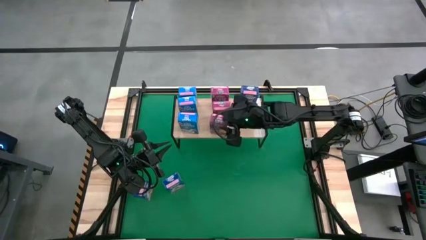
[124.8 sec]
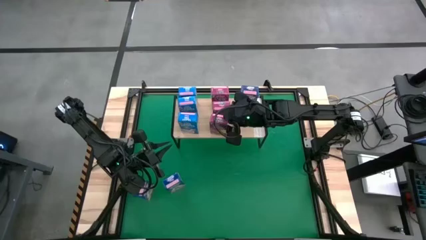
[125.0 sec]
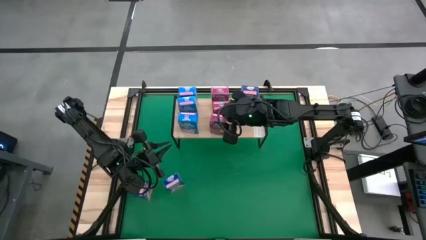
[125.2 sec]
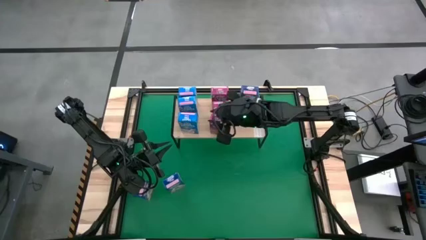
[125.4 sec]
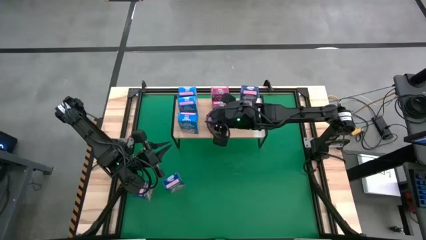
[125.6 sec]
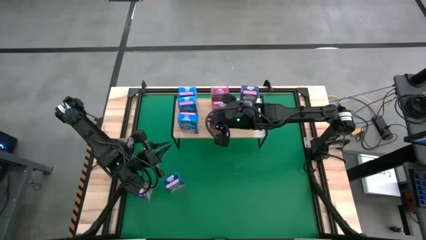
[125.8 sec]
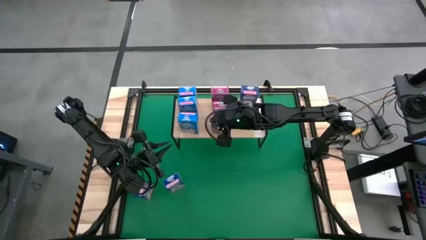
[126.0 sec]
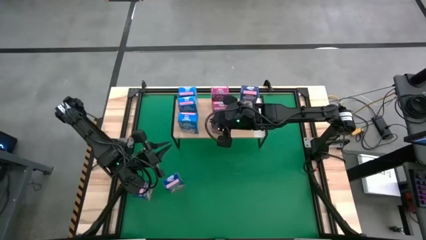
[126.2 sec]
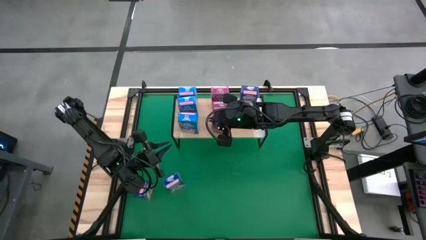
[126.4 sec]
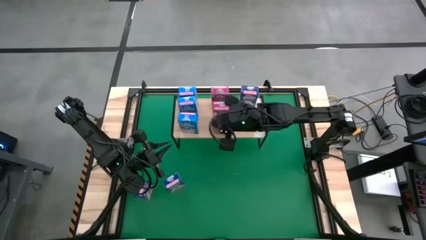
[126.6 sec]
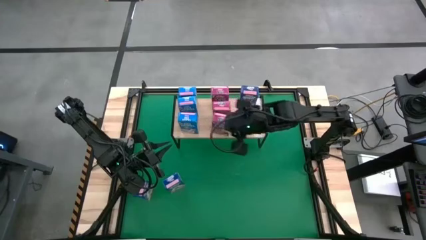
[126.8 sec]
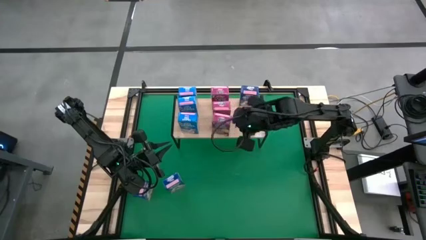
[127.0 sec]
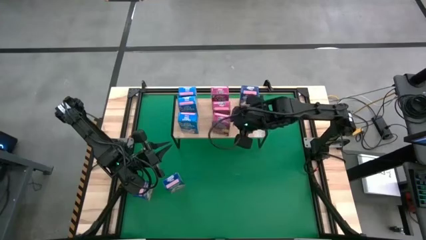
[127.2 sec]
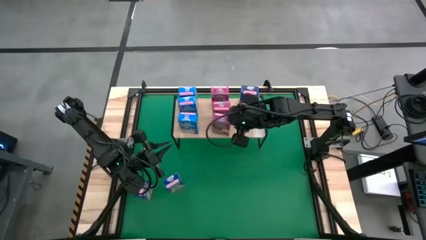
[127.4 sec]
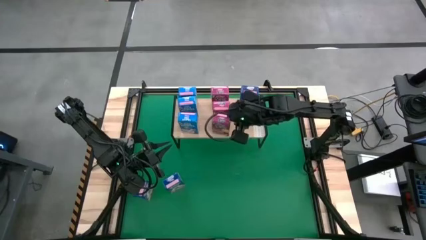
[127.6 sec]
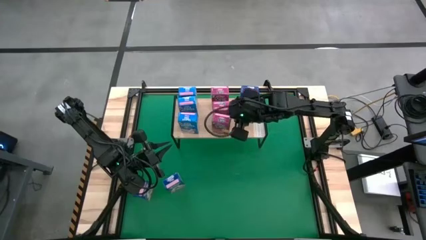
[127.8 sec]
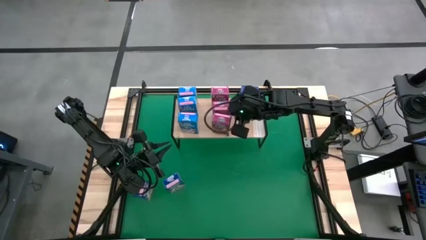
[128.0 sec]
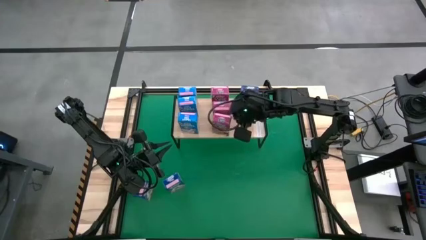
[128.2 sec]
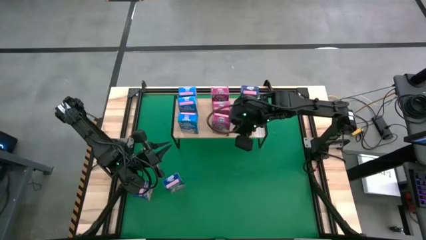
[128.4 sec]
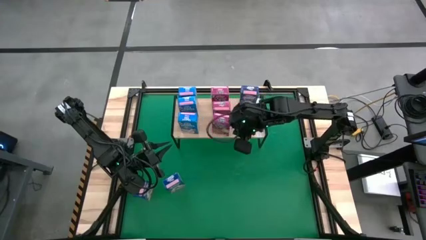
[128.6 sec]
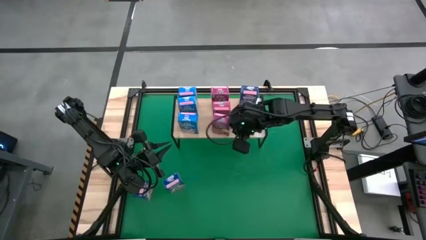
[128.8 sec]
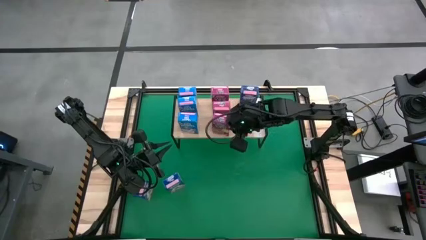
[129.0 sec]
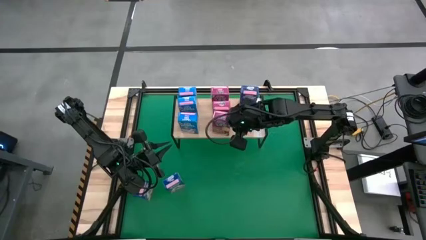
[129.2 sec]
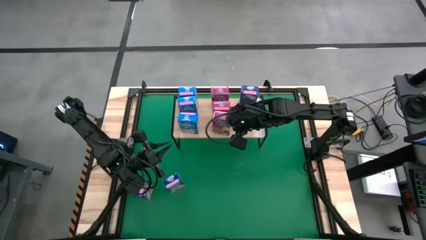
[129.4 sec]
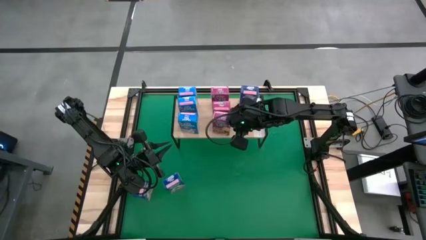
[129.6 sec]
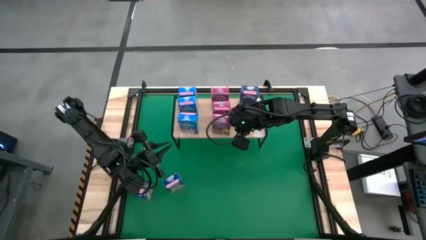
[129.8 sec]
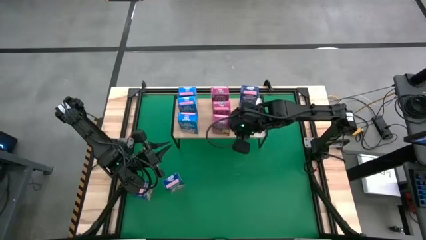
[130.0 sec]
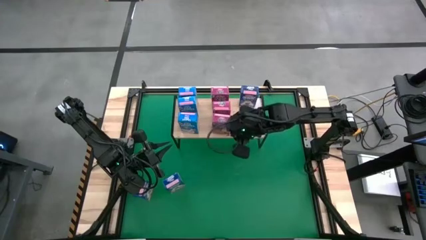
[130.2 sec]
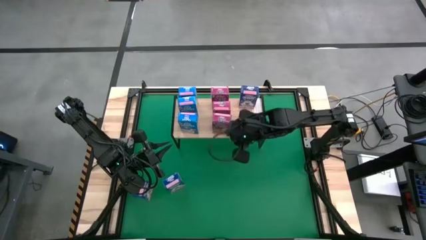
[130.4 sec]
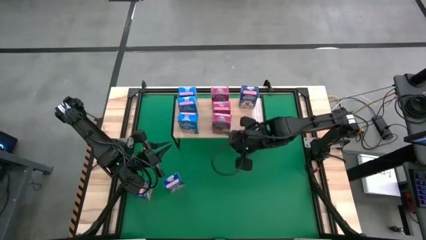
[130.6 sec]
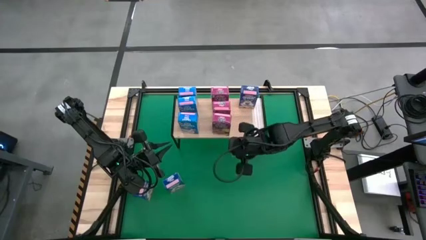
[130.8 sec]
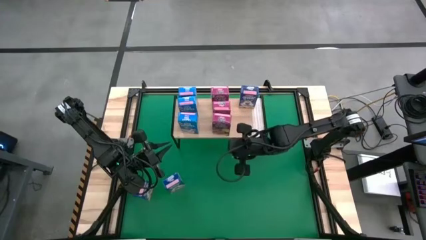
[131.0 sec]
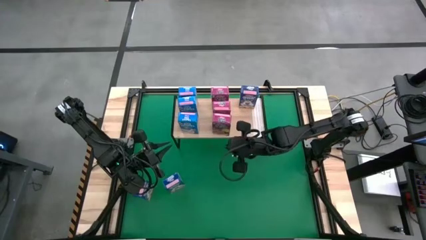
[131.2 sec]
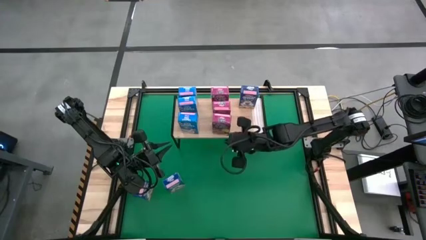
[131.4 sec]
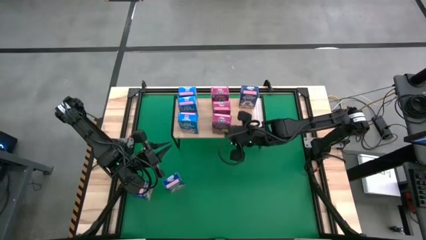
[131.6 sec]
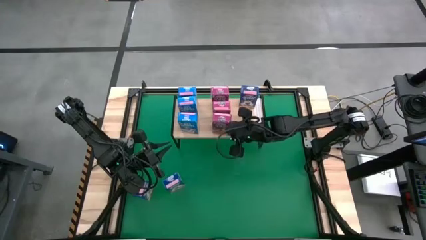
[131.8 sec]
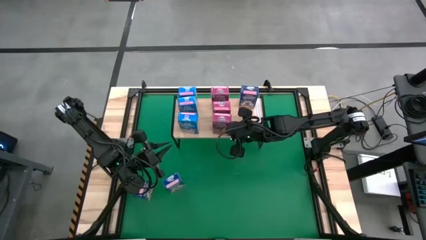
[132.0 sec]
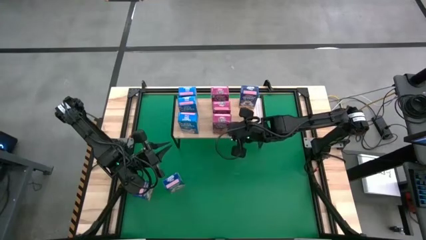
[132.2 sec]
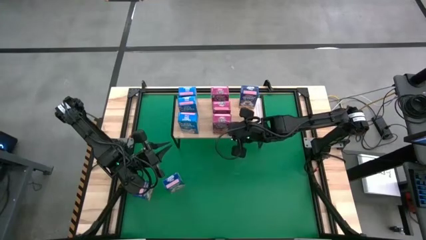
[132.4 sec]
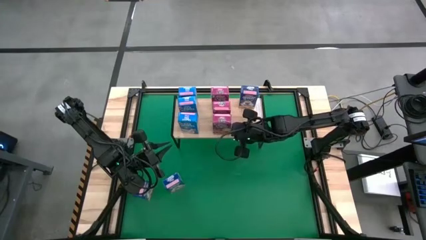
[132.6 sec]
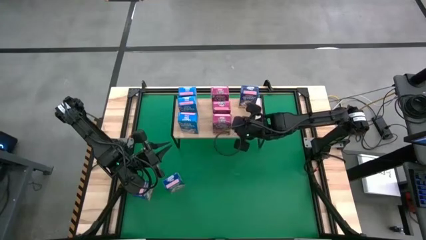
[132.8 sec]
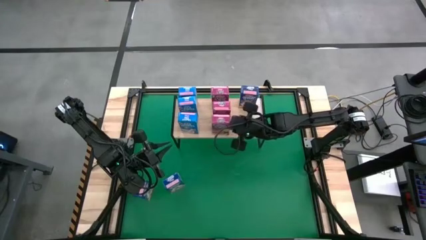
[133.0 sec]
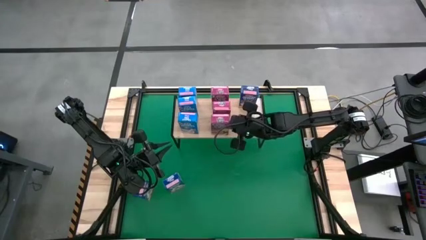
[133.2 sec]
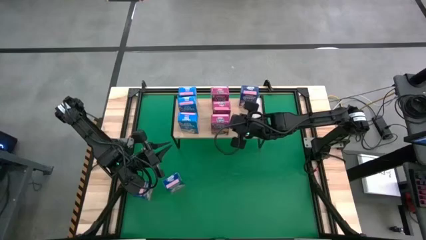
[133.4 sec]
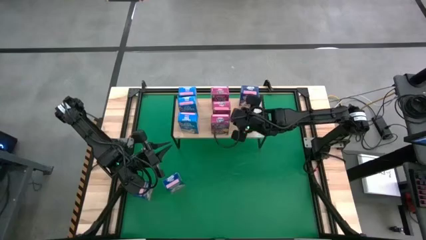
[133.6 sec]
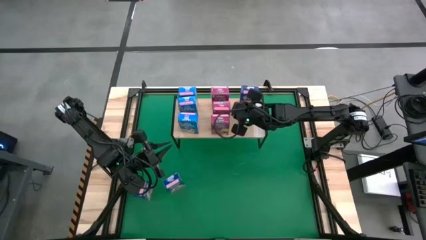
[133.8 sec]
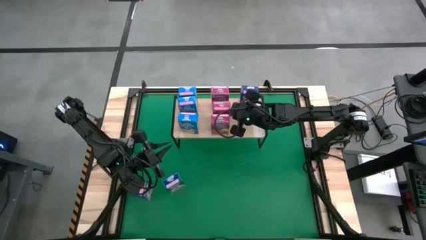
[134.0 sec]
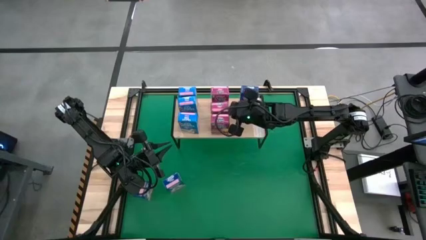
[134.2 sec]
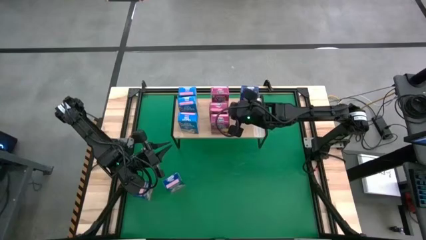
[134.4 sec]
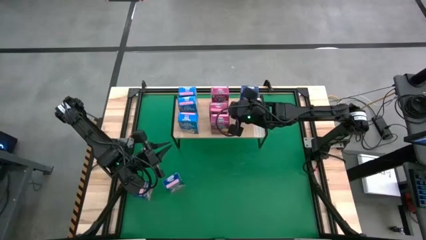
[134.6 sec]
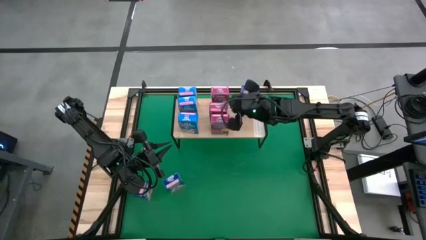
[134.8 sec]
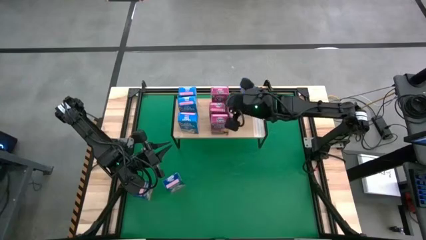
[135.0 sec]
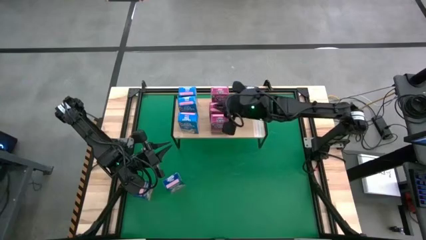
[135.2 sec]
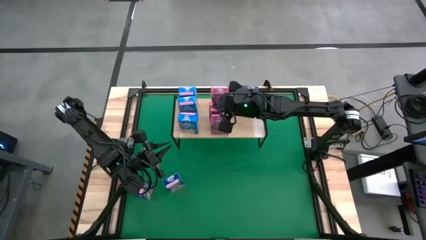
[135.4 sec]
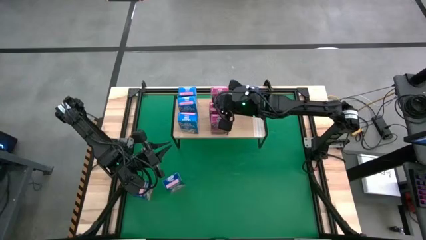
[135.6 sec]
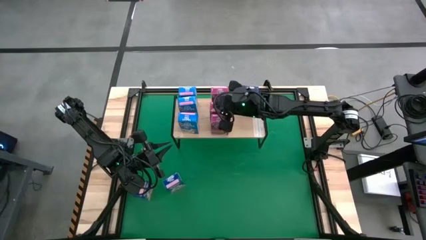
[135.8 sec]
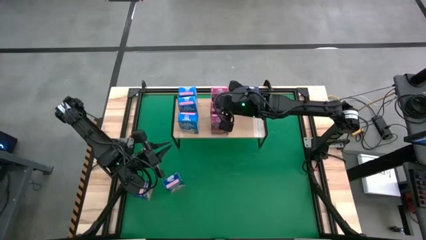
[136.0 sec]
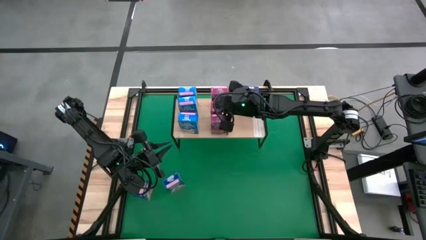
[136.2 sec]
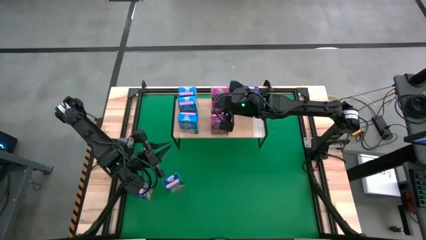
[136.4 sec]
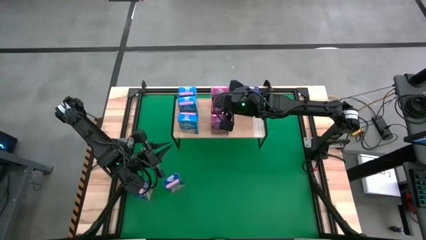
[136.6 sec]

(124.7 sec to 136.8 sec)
Task: Stack cereal on shelf
Put the violet cereal box, aligned with the other violet cereal box on the shelf

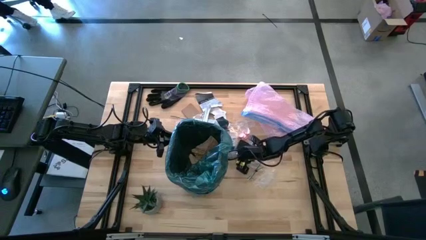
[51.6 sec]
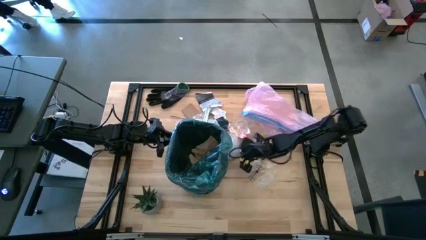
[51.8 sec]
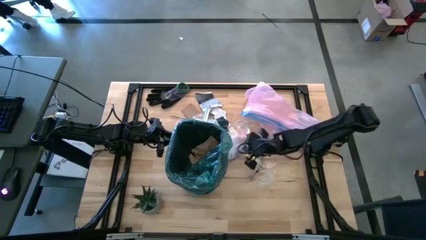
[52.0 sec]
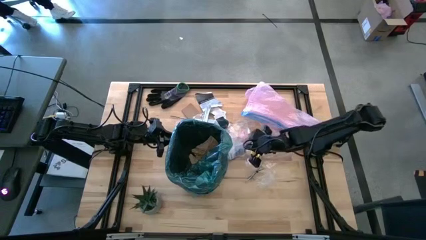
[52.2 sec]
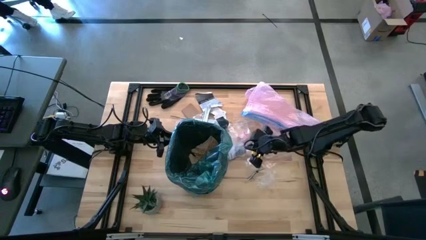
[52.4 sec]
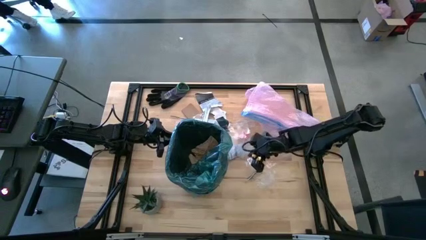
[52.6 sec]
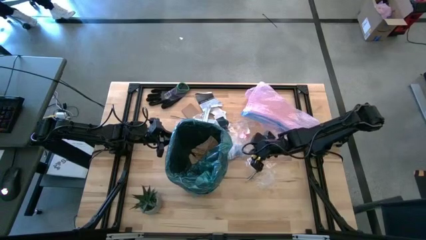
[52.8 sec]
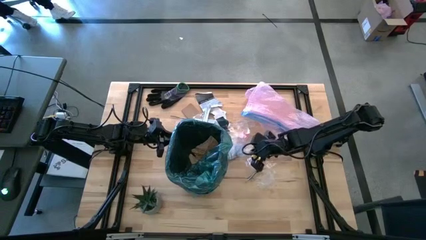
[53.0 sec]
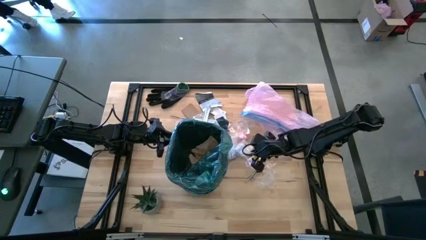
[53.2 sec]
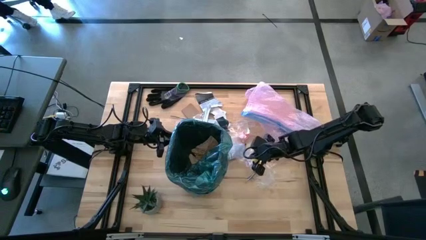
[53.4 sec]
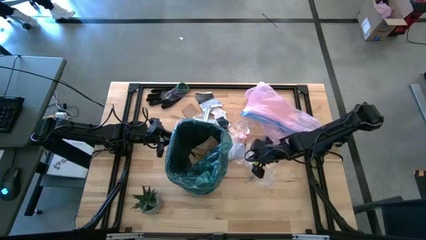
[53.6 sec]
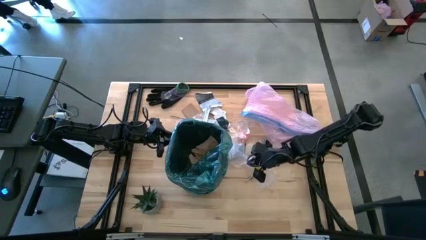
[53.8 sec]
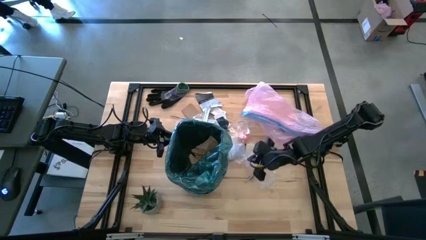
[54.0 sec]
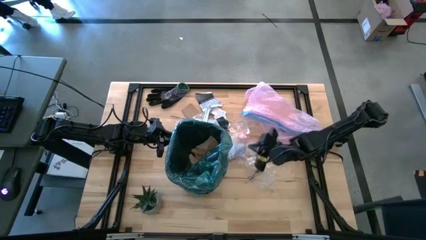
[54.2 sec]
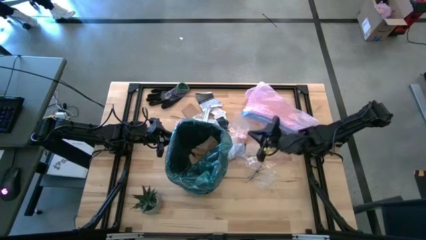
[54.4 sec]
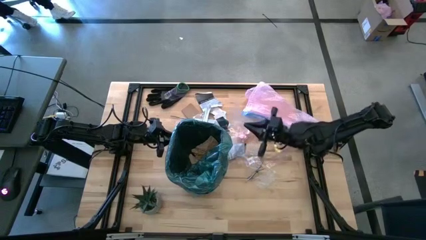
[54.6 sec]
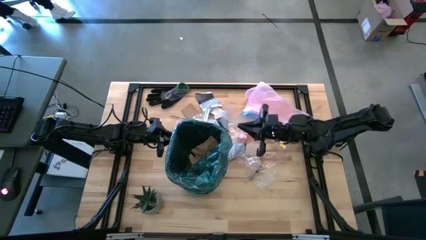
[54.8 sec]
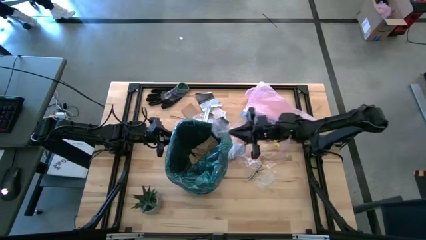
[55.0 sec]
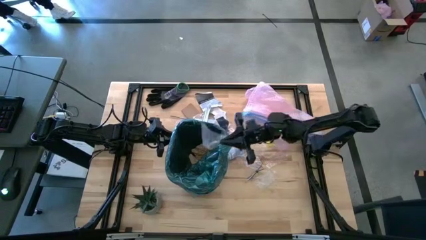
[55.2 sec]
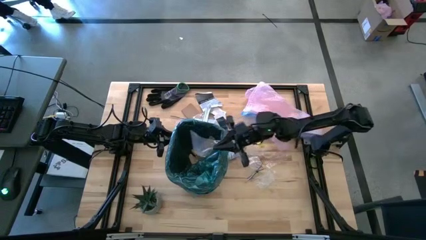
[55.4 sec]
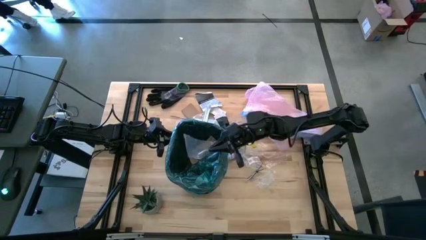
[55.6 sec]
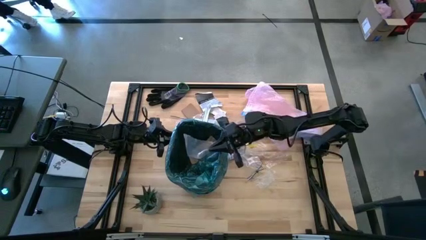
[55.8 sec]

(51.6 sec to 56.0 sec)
Task: place trash/remove bag and relplace
Put the clear plastic into the trash bin
